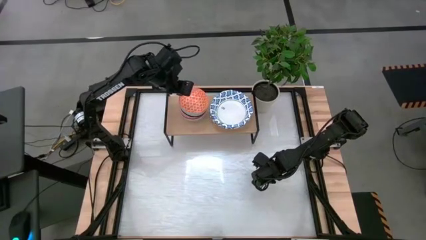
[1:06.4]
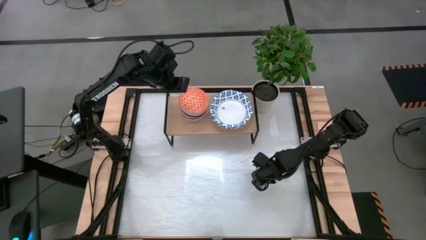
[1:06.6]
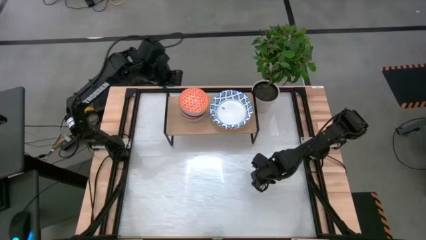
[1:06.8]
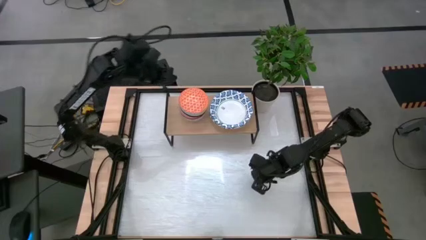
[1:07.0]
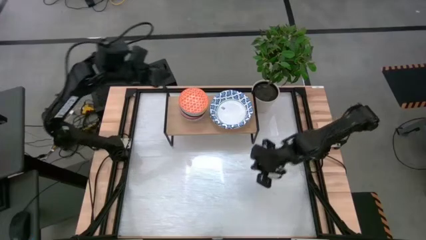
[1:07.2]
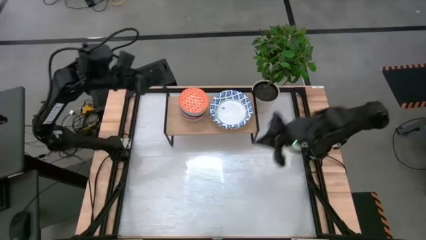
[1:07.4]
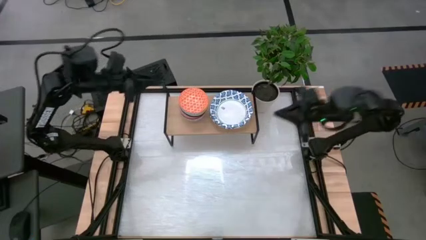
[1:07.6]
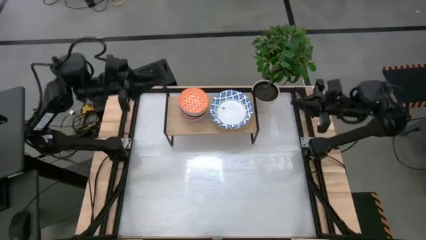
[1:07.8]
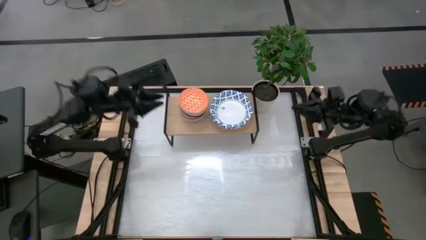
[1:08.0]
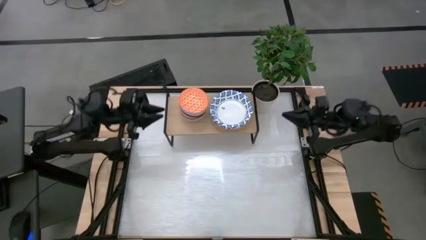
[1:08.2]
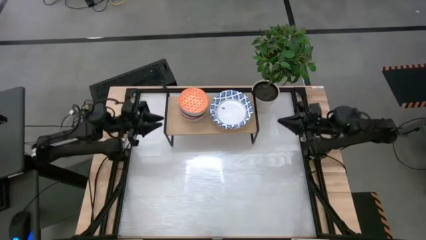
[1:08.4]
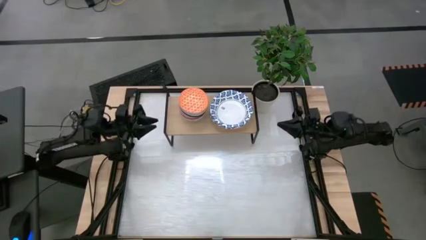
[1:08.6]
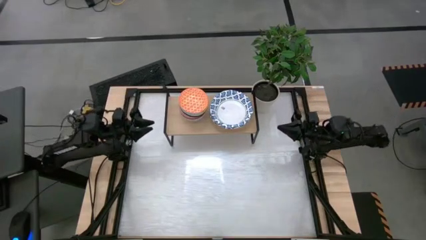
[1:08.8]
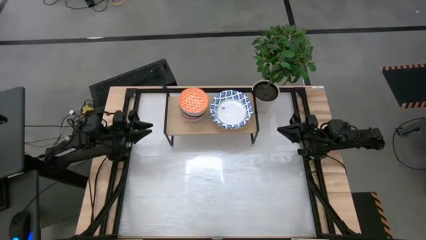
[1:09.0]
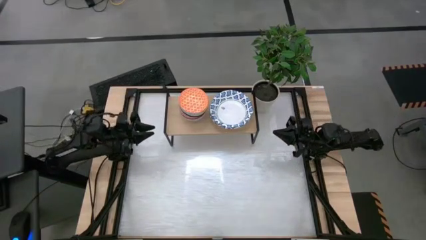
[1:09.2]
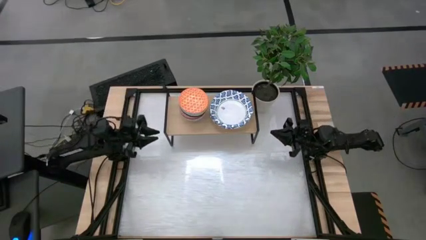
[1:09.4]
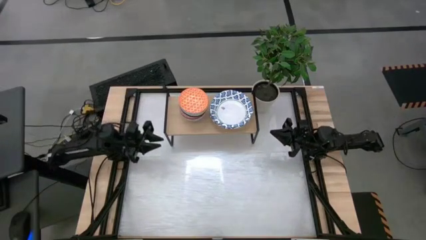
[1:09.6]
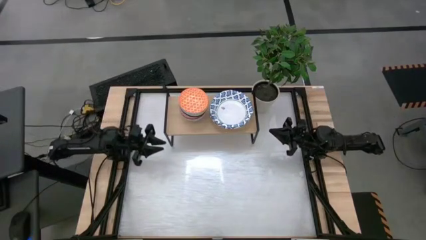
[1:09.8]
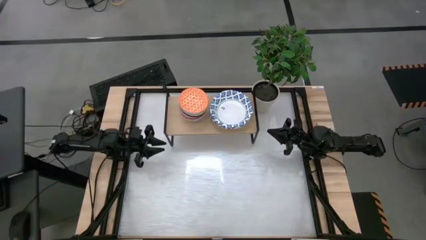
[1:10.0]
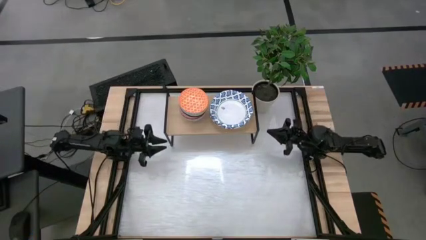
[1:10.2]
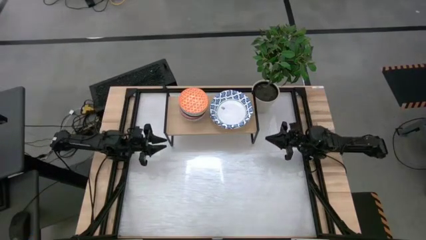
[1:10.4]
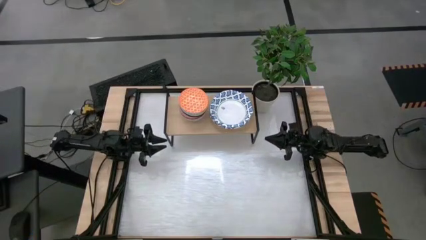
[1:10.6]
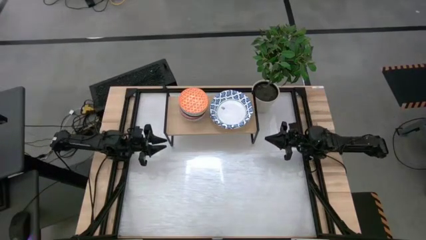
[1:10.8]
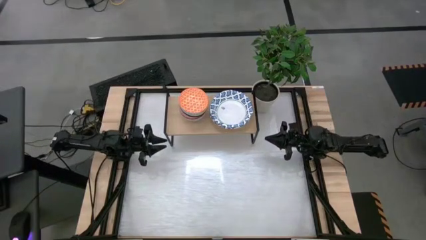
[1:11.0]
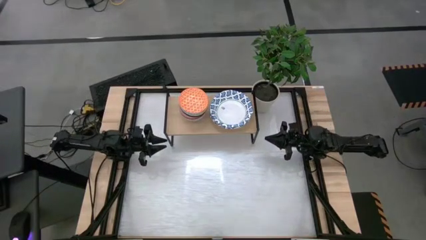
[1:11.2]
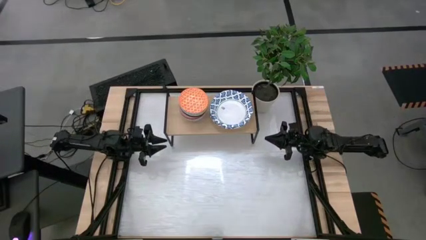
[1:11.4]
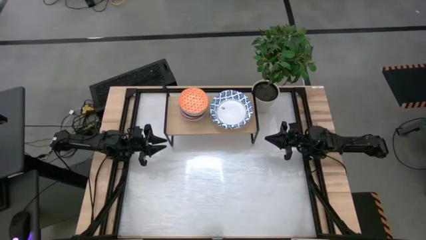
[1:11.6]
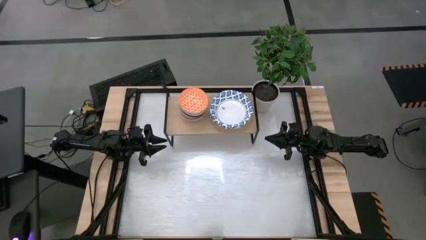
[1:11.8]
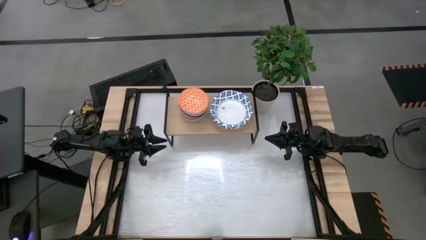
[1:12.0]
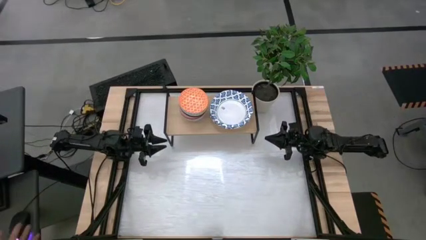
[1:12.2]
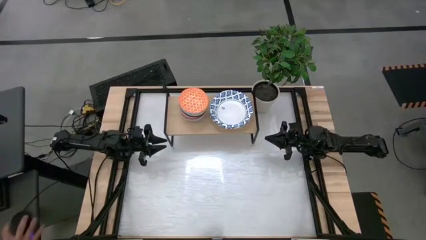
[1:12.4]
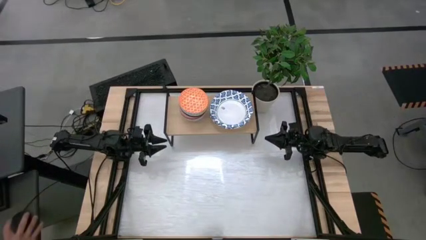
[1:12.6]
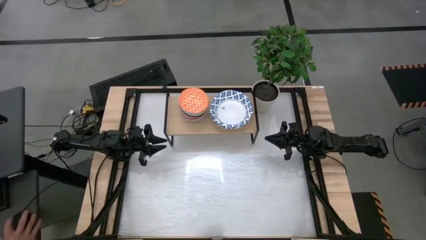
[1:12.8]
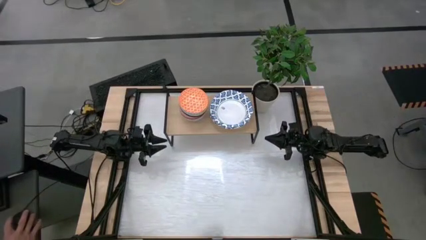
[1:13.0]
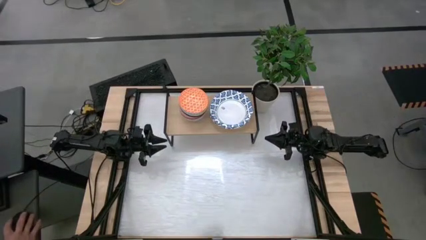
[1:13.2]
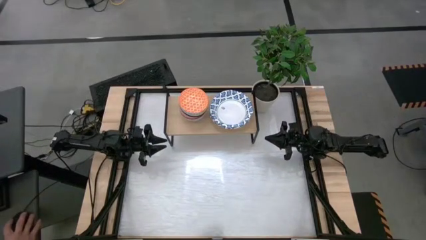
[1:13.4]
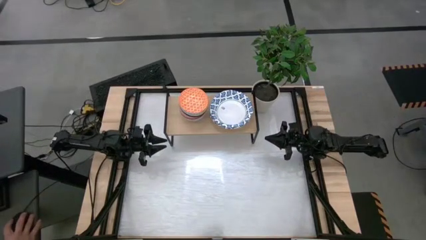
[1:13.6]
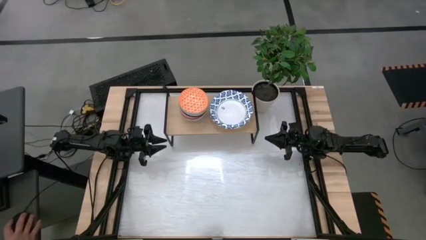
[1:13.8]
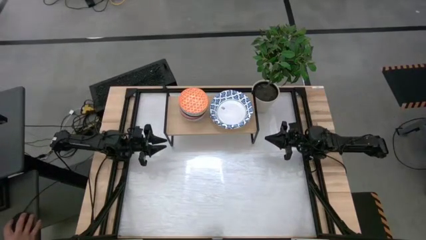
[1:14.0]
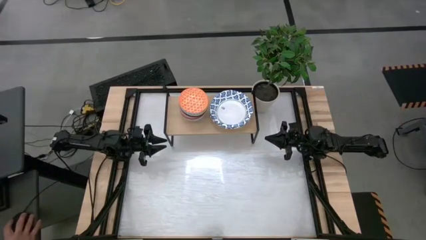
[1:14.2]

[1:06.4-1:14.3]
Task: Place and stack bowls onto a shelf
Return to Home Position

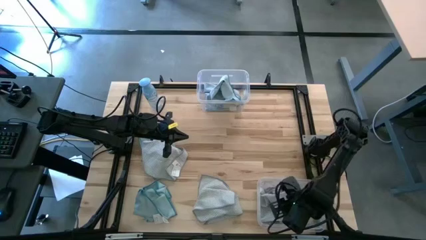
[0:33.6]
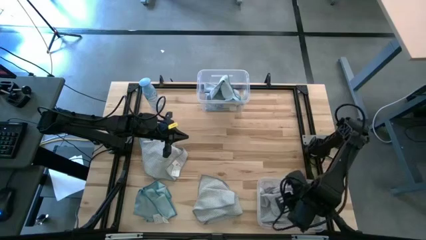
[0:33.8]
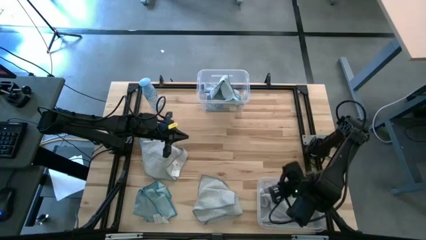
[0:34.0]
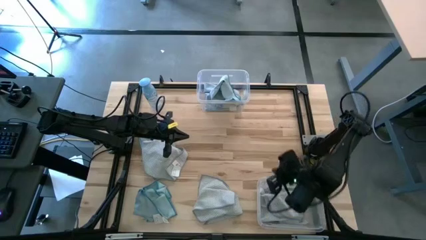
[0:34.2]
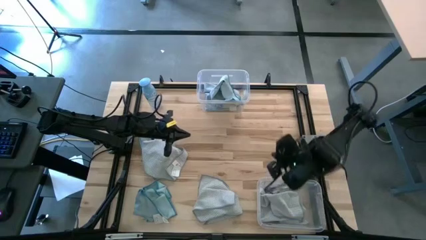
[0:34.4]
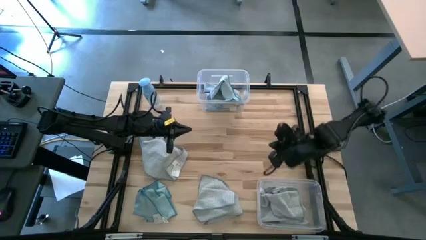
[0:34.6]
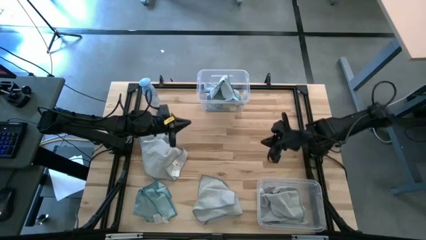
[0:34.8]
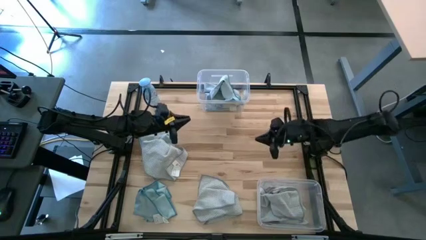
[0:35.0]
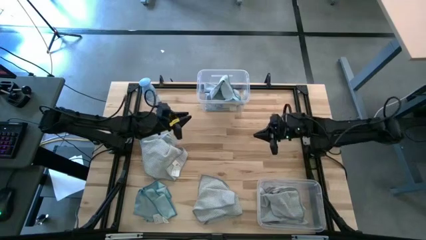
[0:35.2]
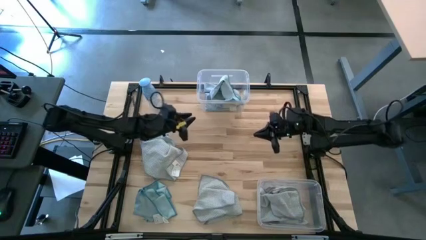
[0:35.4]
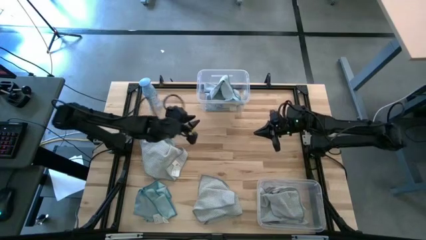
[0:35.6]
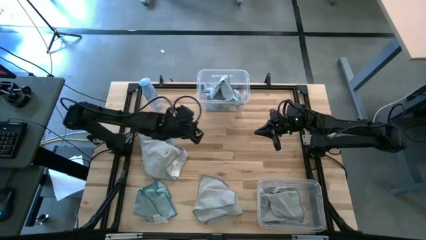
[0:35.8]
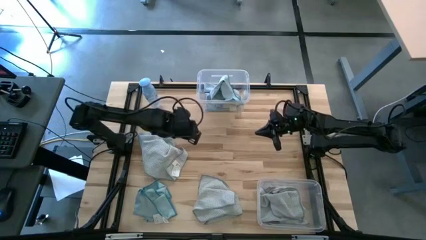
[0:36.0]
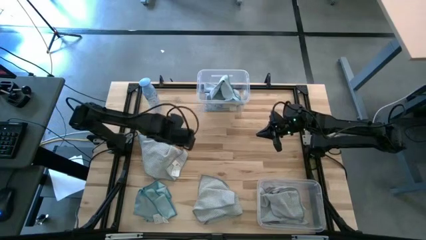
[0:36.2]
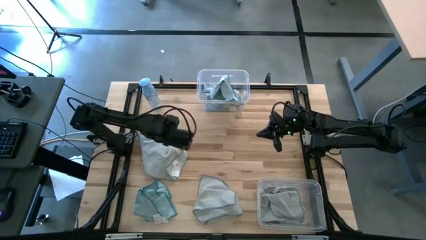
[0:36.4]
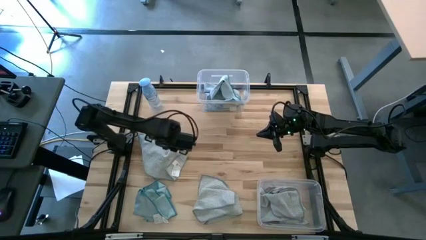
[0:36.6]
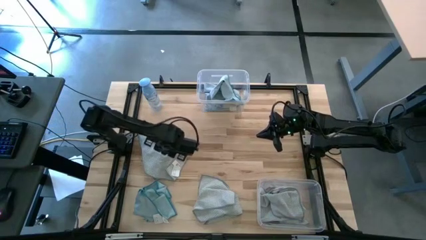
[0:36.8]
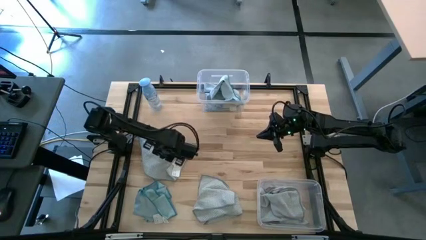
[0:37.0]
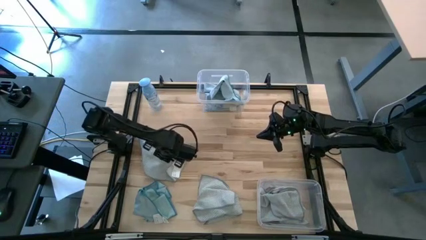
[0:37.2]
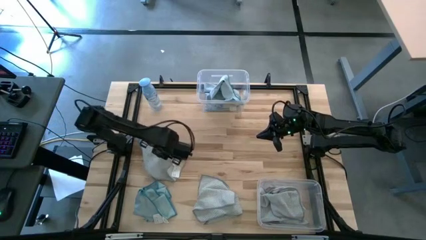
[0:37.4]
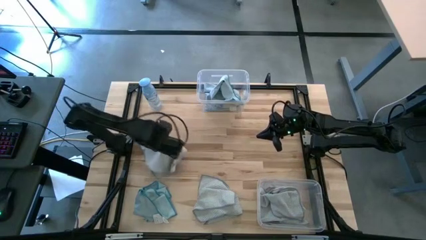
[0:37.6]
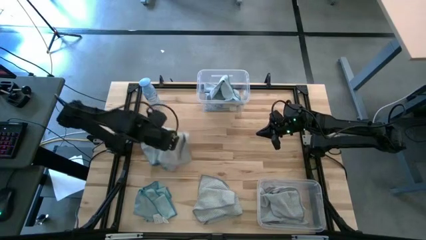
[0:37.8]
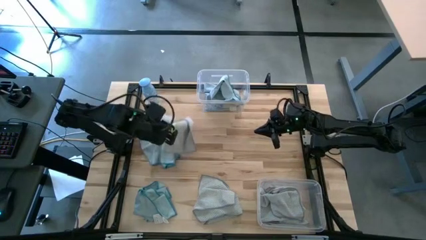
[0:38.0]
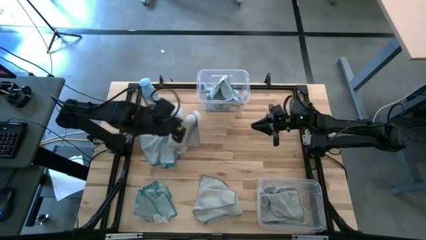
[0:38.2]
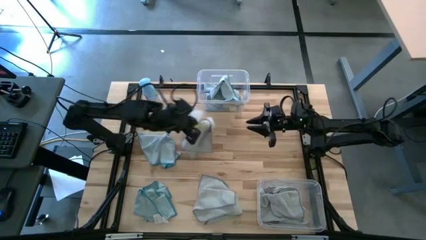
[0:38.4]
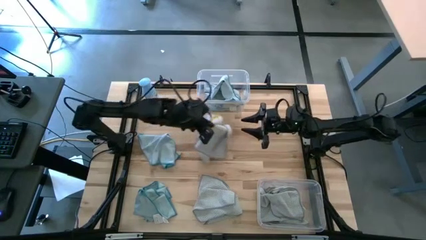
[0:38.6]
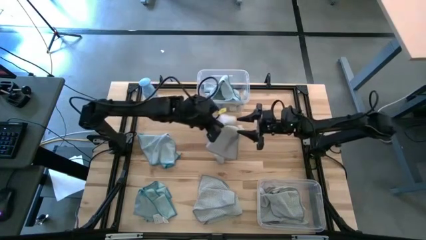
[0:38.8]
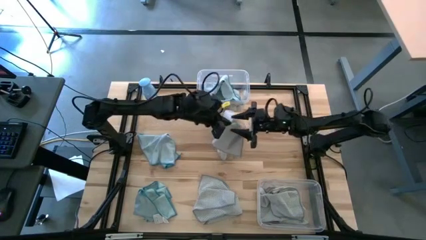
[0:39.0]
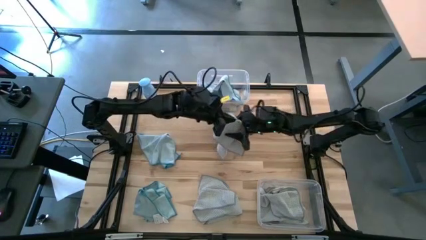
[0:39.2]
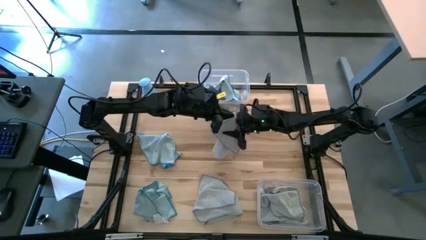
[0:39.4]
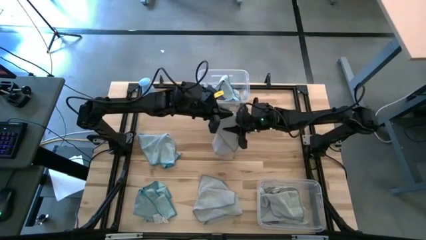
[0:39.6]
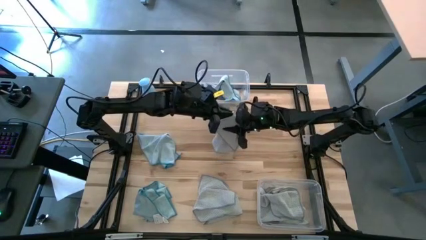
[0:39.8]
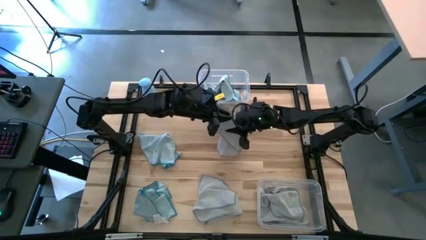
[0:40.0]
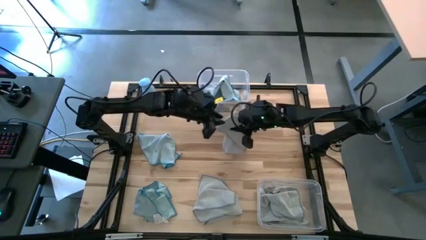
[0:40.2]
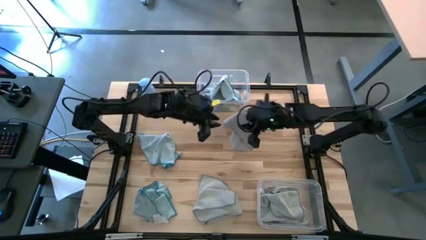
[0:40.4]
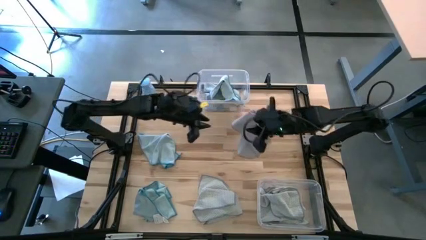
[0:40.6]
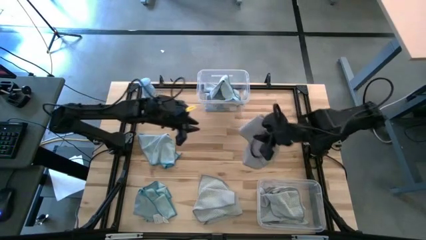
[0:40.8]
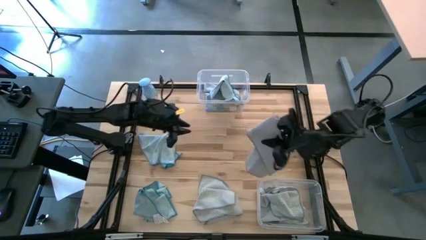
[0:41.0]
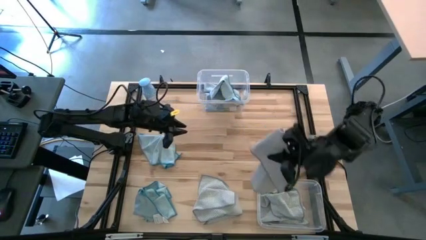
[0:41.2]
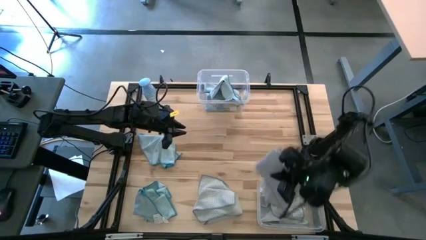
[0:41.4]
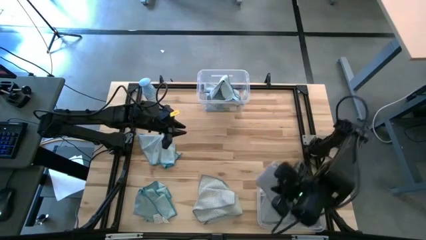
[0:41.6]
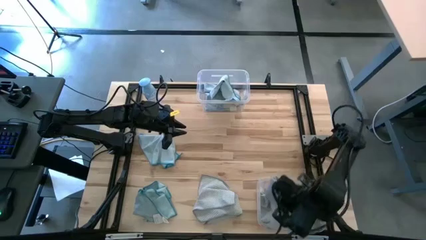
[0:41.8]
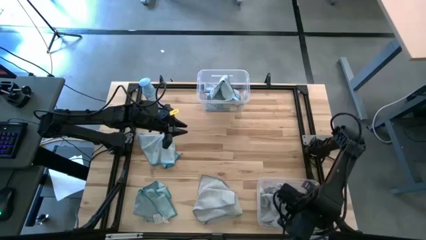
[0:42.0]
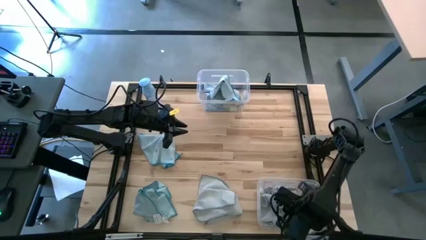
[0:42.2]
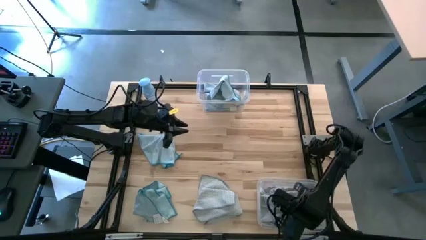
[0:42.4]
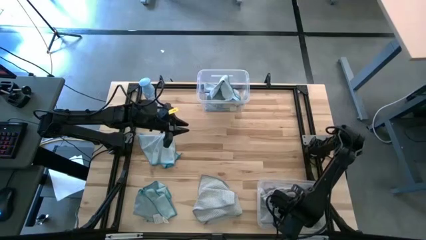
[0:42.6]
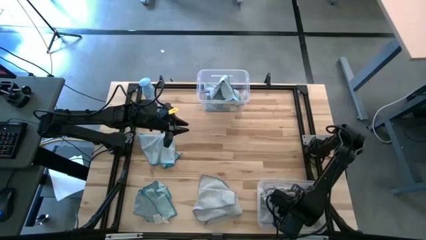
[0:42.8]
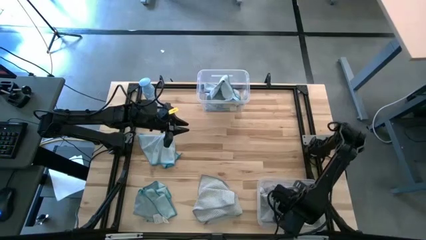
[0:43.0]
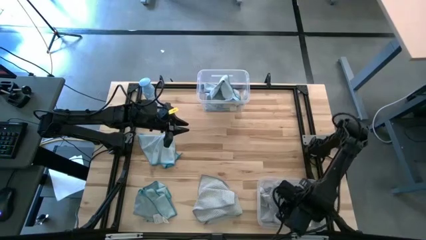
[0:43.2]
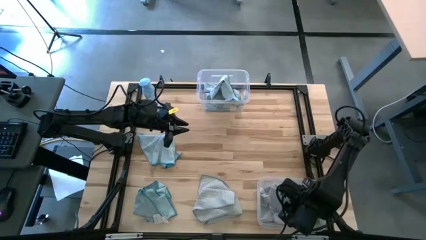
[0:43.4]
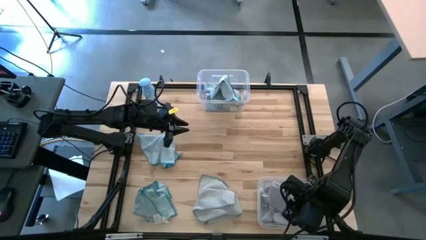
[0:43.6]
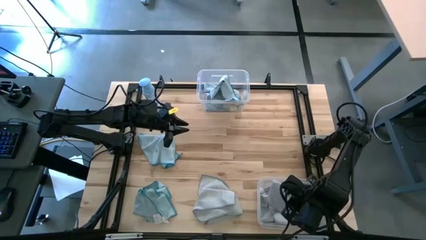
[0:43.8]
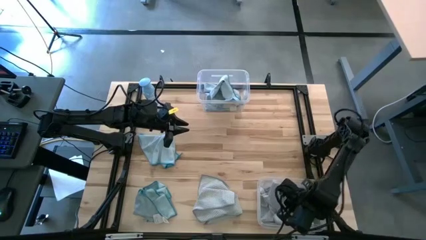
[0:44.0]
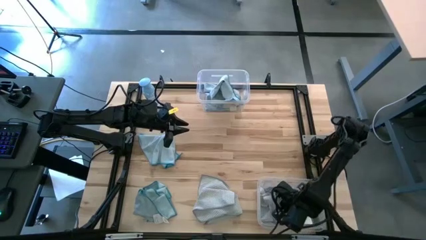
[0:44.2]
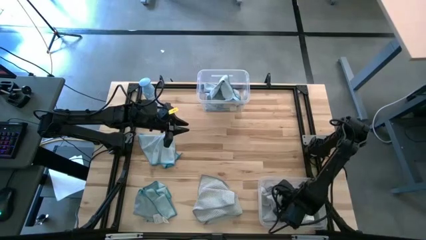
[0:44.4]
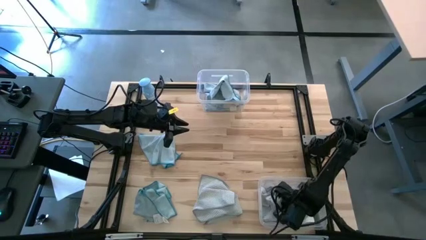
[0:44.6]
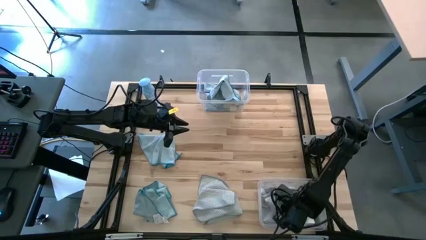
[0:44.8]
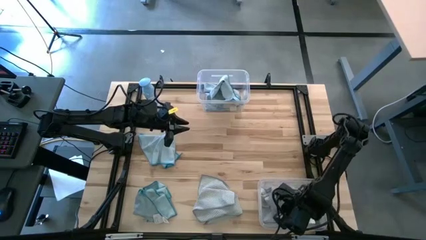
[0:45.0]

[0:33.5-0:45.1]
Task: Sort microfiber towel by color & place in baskets
Put the gray towel into the bottom transparent bin
